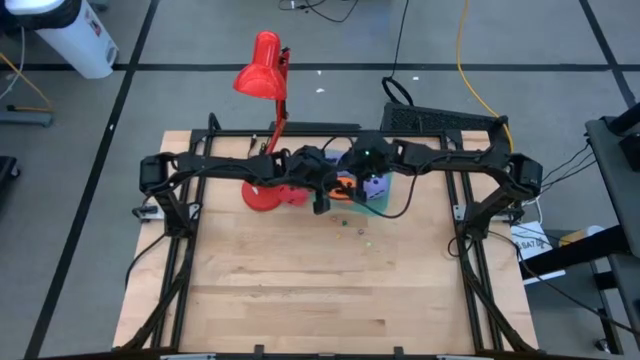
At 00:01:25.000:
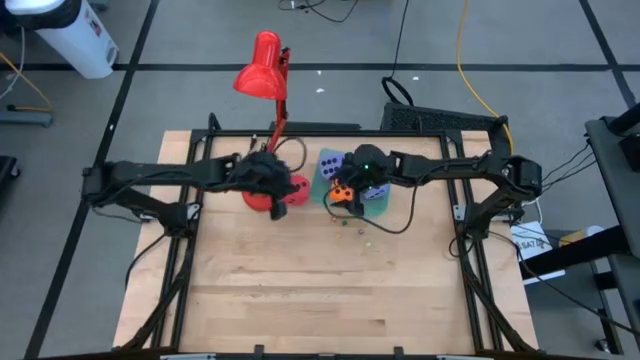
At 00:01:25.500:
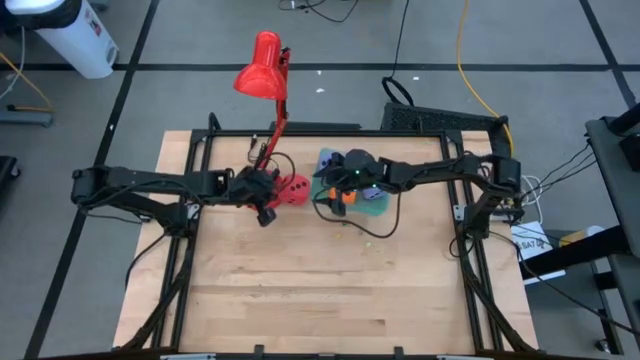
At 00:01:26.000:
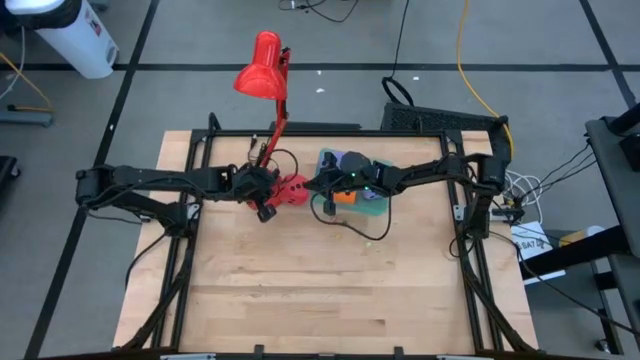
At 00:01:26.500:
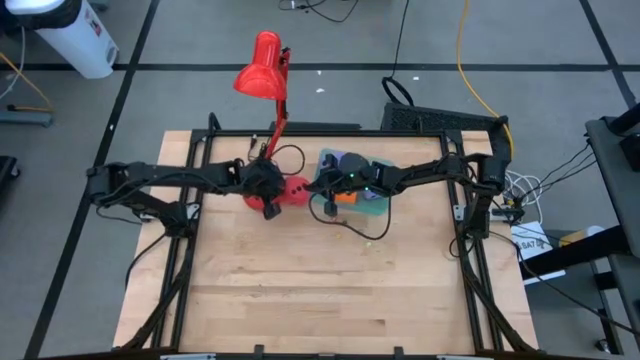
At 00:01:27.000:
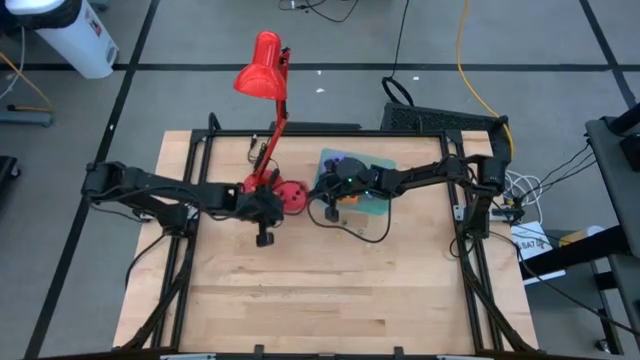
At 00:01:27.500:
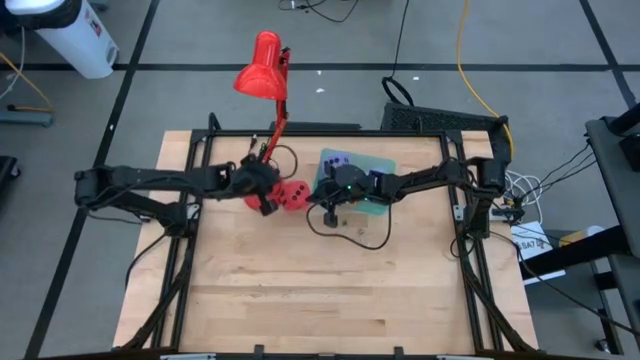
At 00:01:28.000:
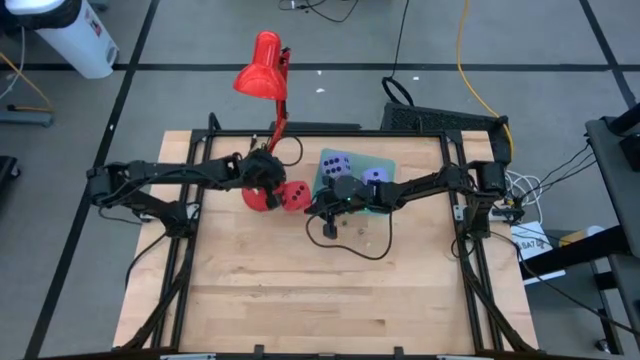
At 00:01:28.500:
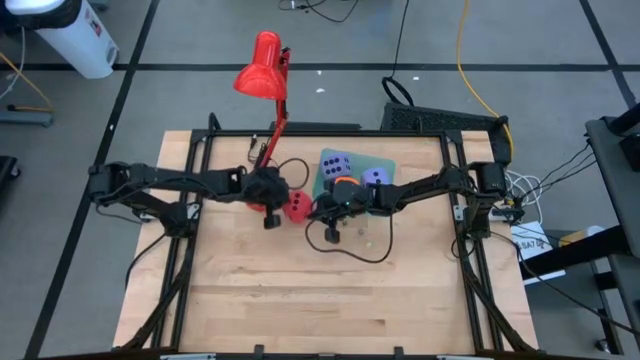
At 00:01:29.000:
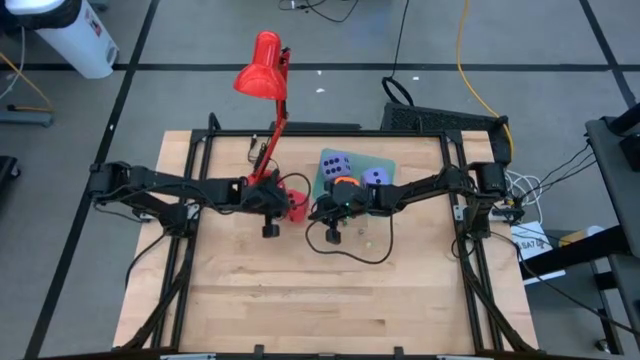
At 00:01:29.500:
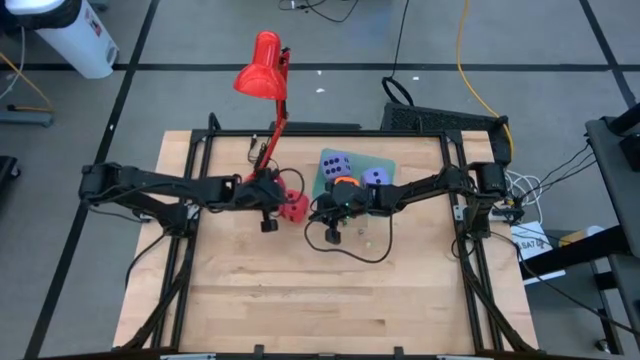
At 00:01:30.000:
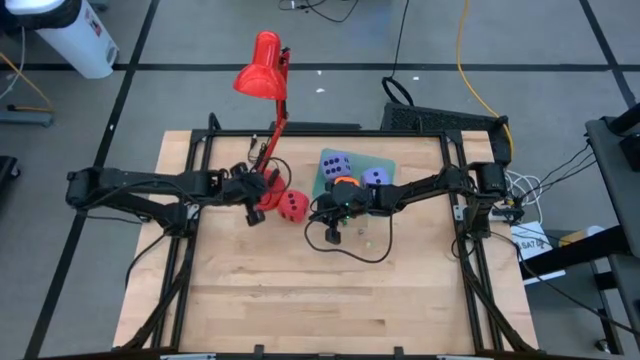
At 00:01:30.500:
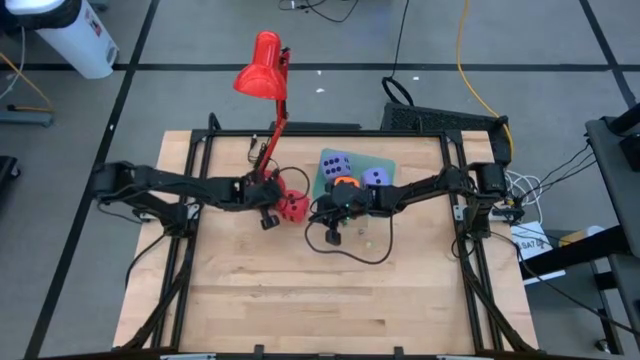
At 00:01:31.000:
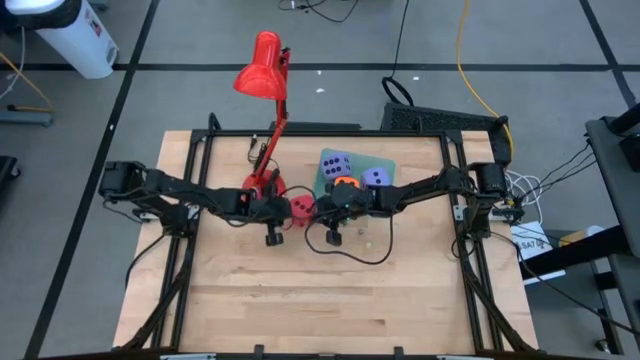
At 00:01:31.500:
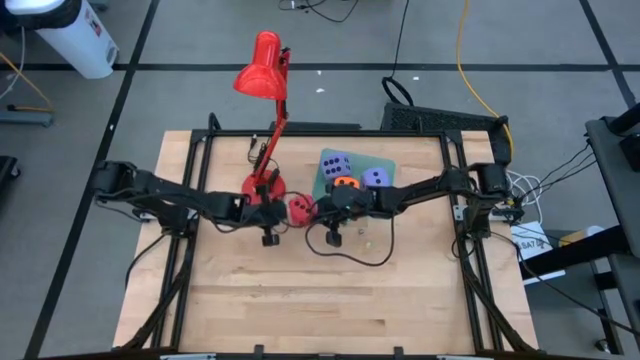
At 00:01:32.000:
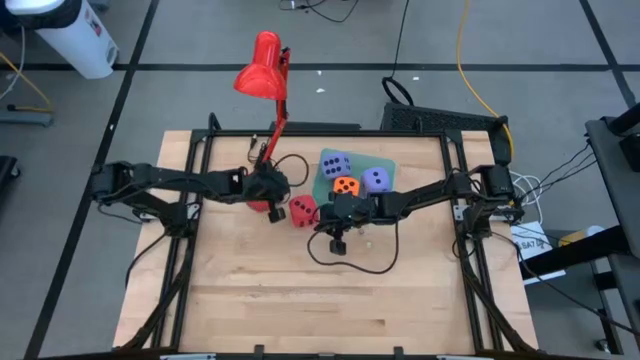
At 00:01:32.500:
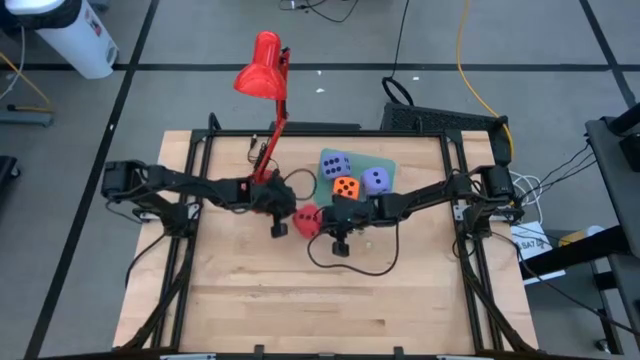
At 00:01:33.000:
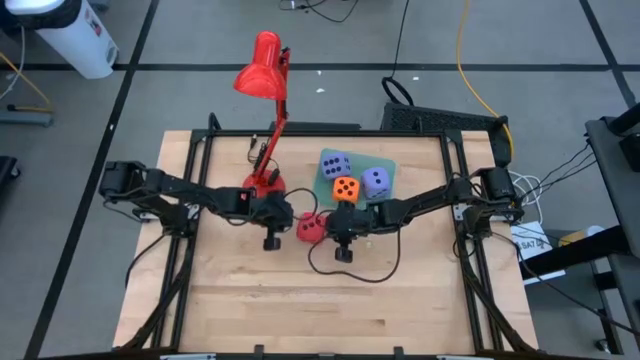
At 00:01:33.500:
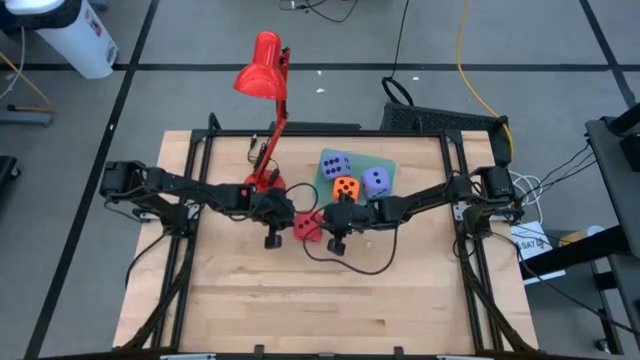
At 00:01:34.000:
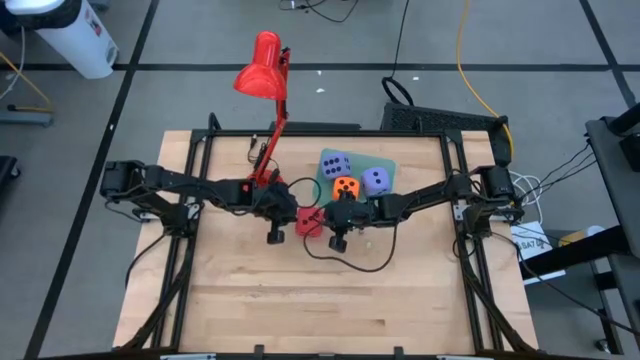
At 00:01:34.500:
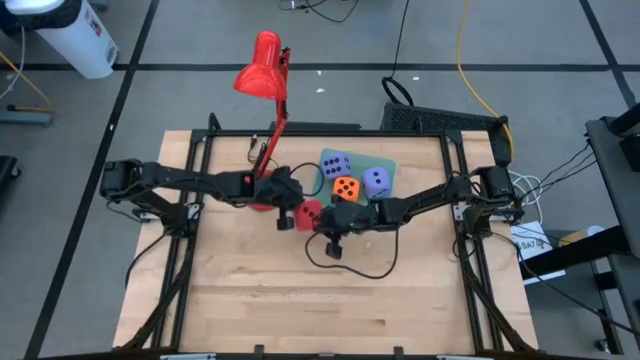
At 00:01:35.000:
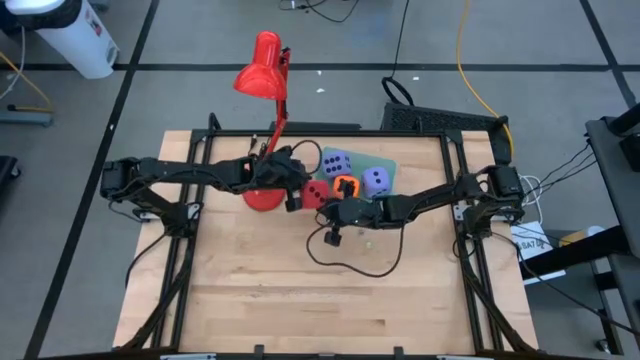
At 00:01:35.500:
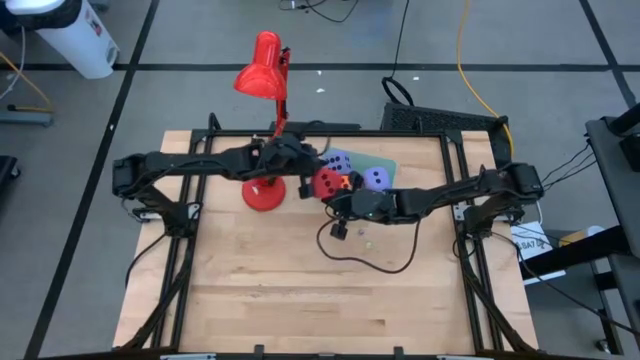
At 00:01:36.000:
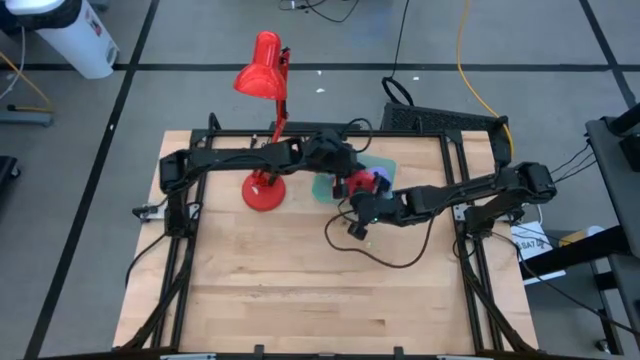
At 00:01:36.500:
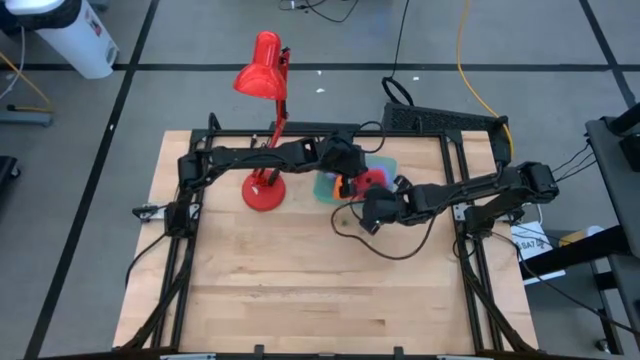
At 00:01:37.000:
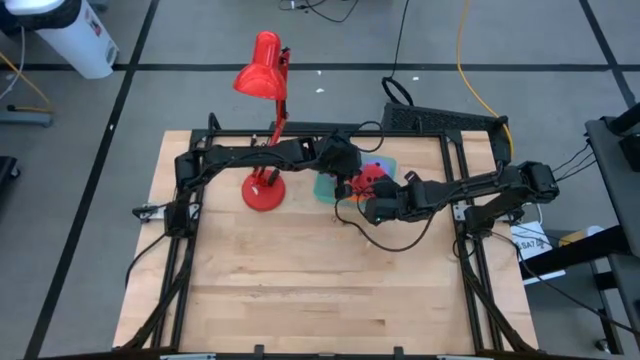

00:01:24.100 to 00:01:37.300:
Task: Pick & Place Dice
Put the big red dice into the green bin

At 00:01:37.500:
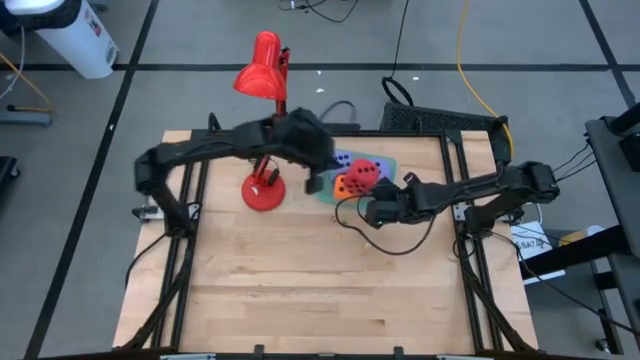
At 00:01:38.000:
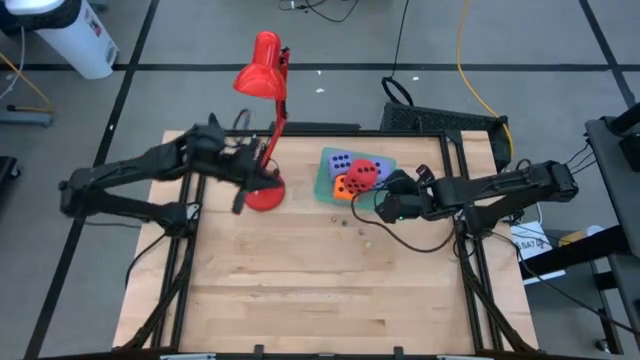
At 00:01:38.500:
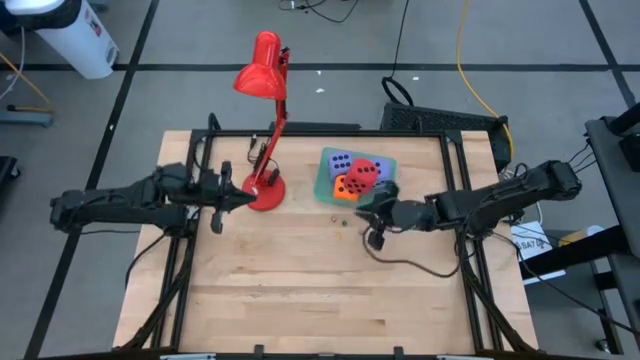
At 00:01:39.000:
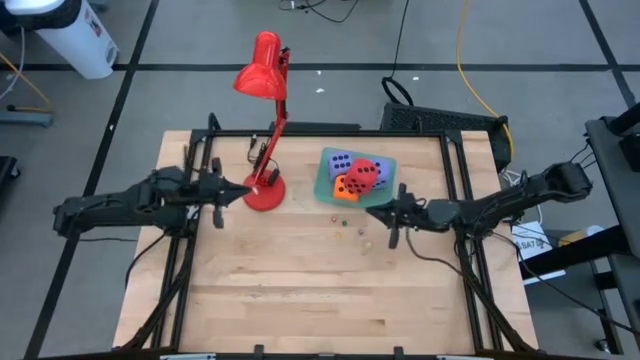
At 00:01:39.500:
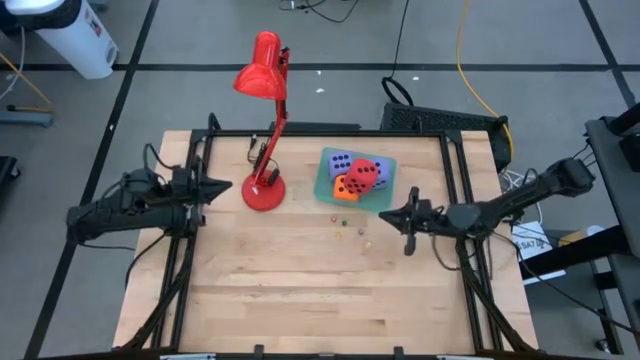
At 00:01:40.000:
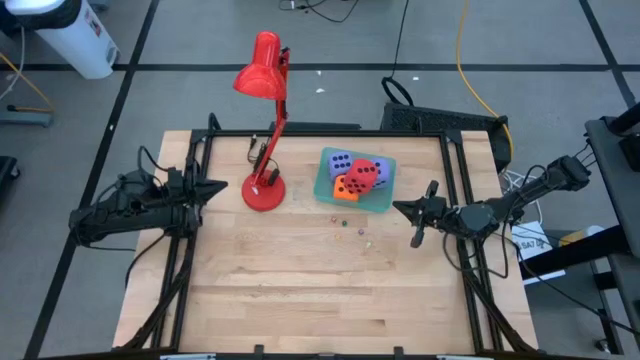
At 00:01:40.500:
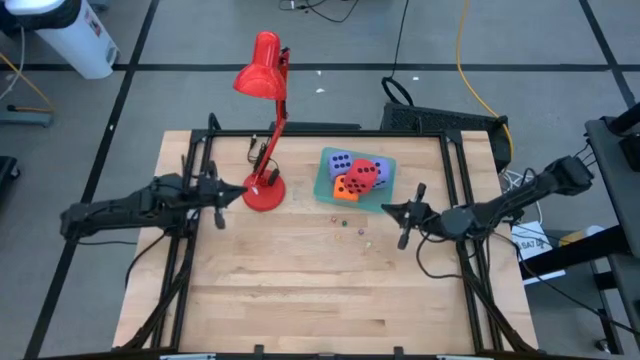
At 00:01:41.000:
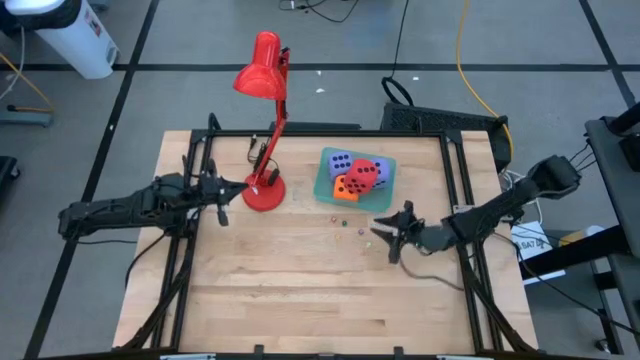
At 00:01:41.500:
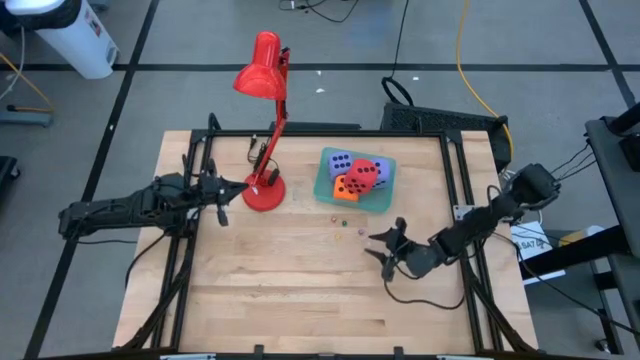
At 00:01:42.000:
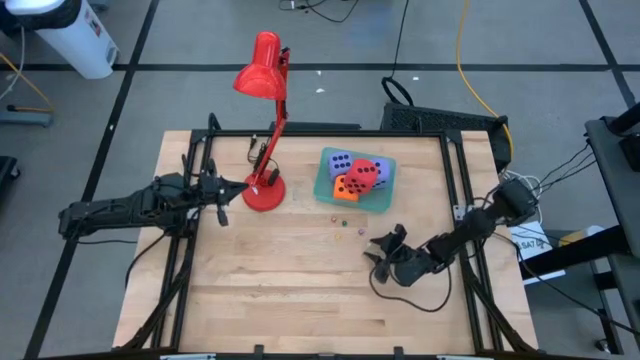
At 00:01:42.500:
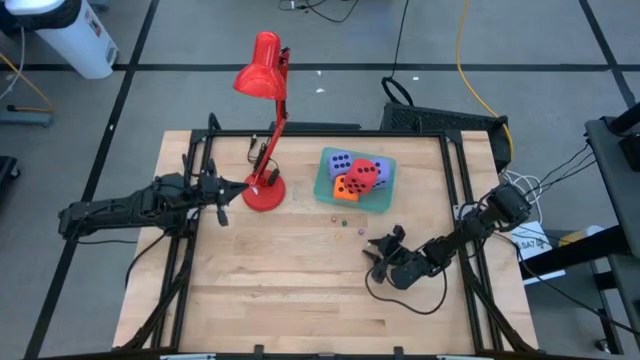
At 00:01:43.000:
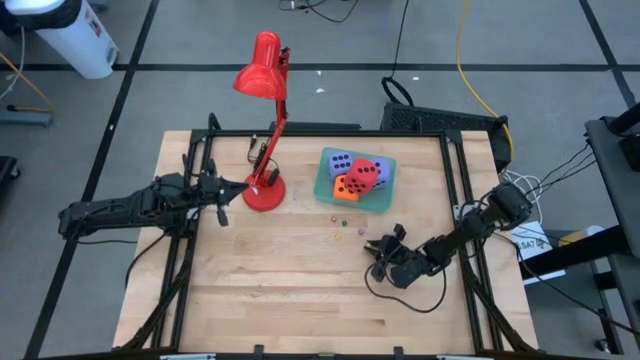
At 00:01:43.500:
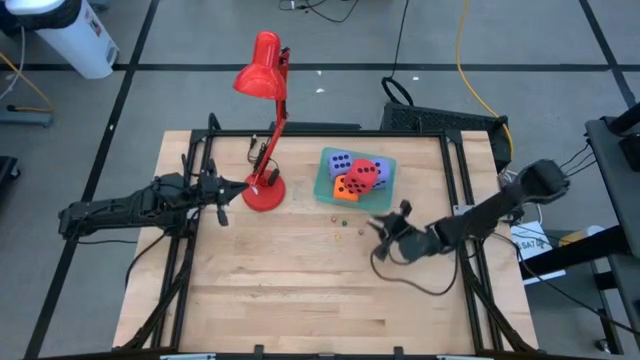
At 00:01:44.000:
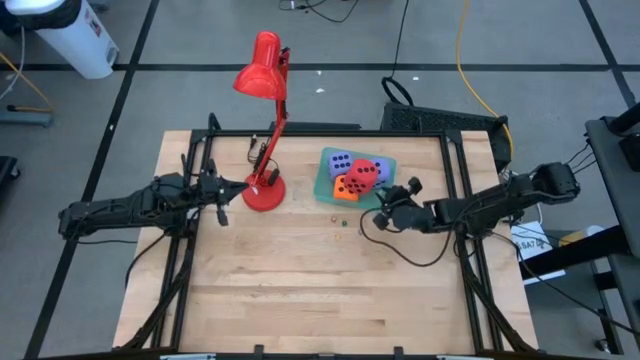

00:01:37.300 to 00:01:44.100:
Put the small light yellow dice into the green bin

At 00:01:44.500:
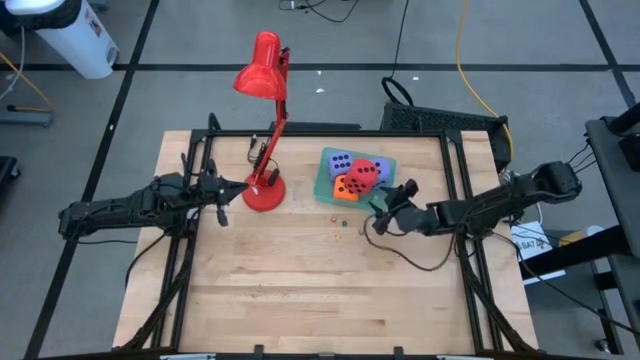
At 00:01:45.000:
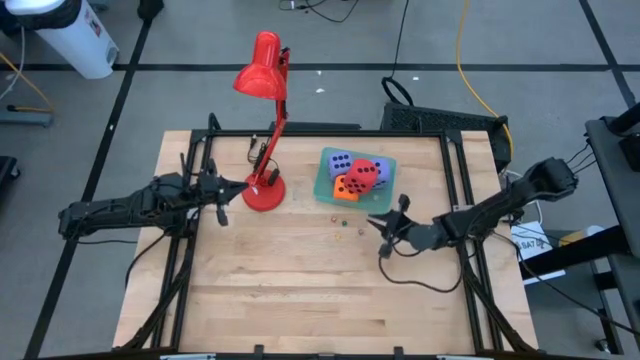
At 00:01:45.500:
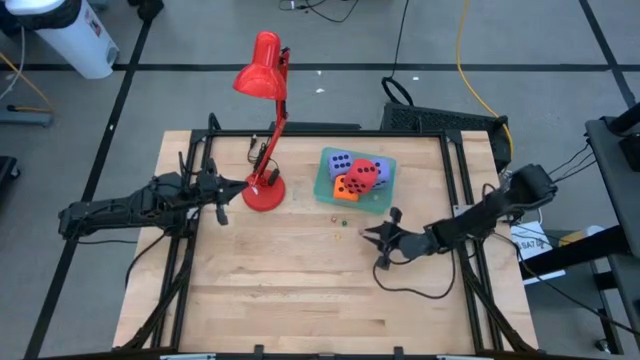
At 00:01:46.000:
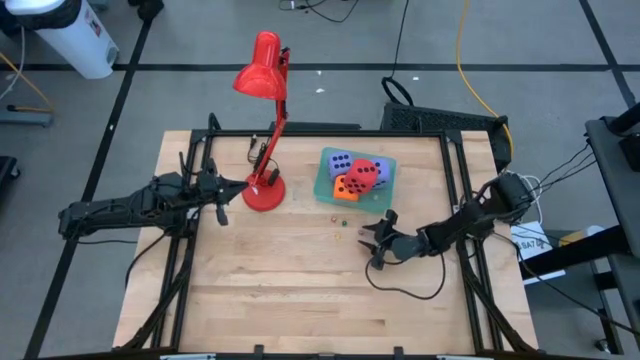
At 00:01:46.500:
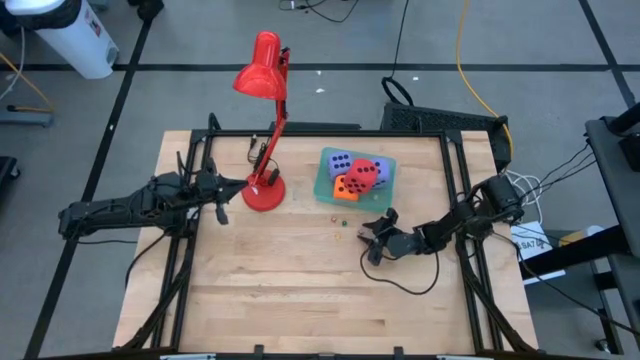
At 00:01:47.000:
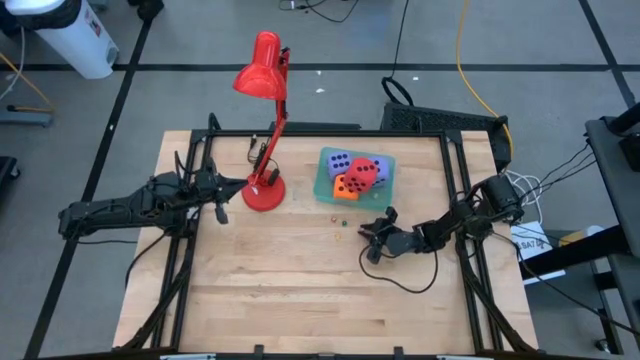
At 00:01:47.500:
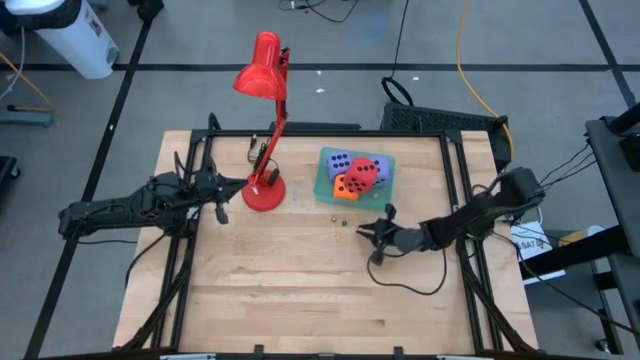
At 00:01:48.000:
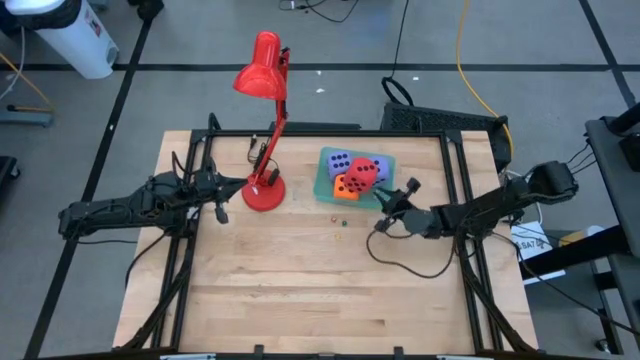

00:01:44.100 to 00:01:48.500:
Put the small purple dice into the green bin
